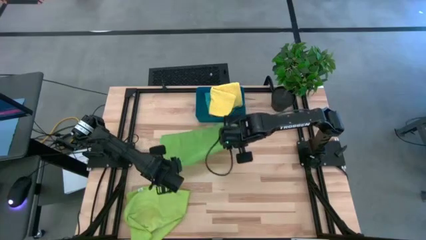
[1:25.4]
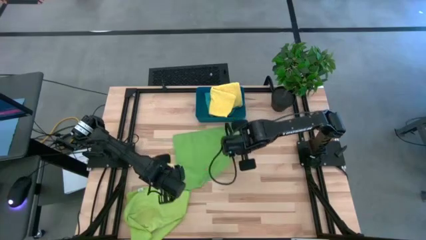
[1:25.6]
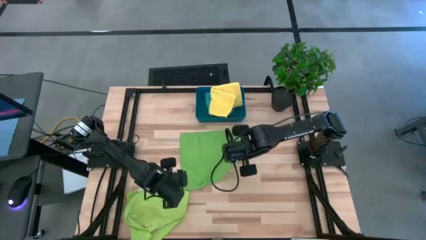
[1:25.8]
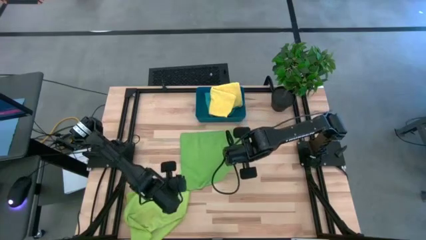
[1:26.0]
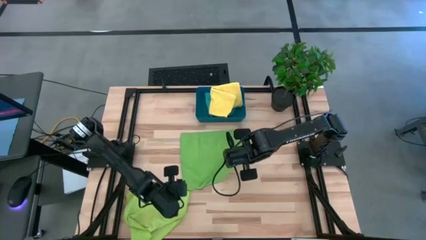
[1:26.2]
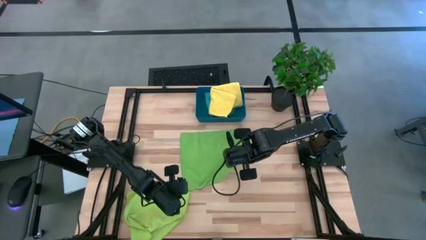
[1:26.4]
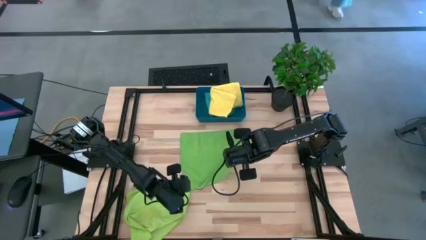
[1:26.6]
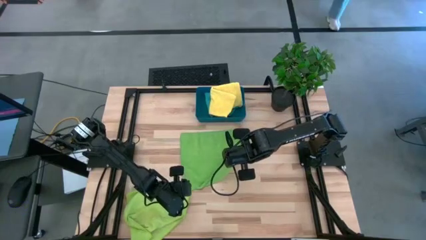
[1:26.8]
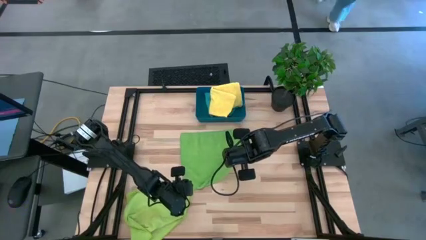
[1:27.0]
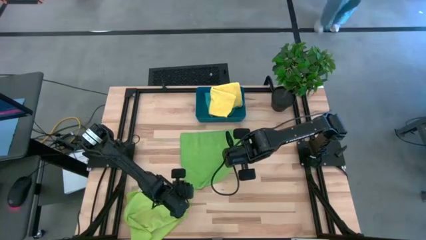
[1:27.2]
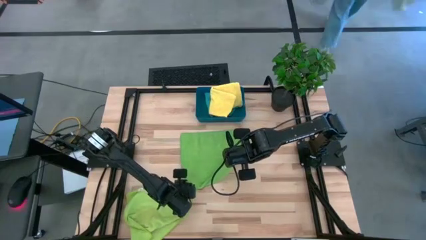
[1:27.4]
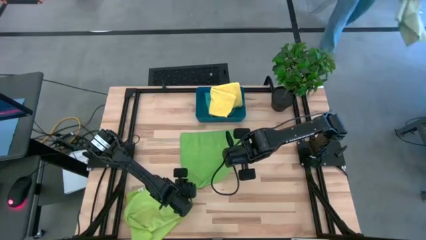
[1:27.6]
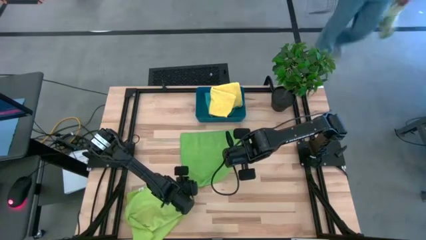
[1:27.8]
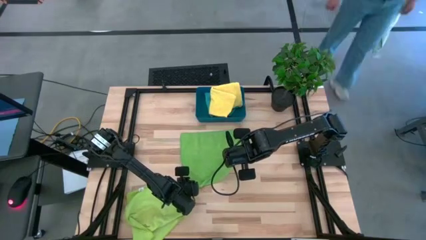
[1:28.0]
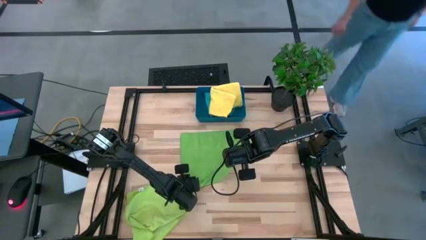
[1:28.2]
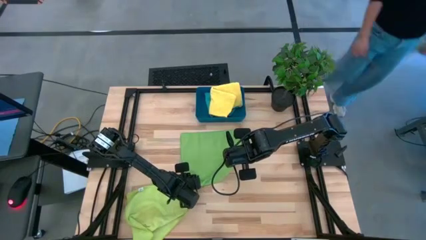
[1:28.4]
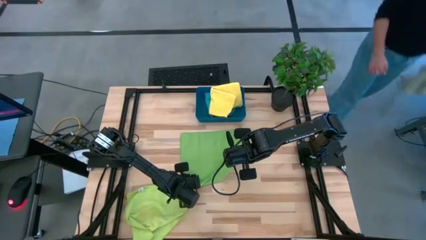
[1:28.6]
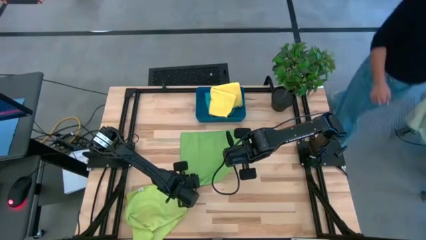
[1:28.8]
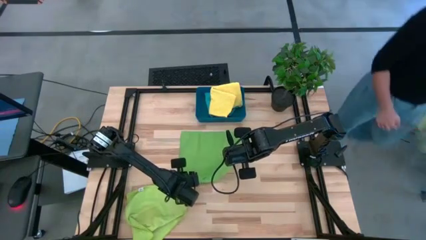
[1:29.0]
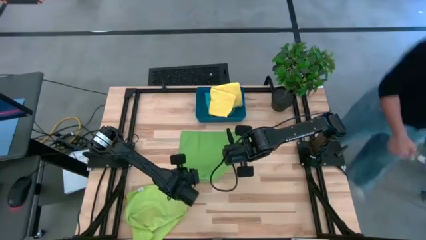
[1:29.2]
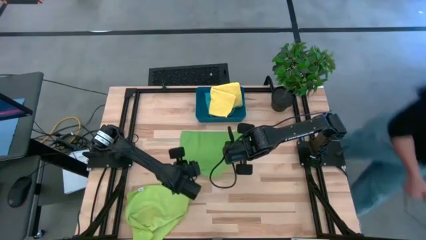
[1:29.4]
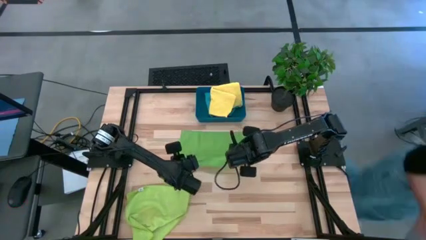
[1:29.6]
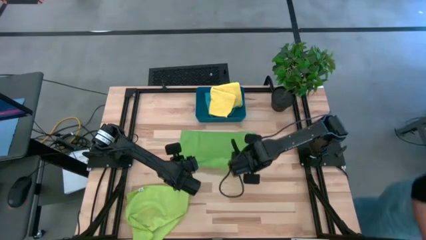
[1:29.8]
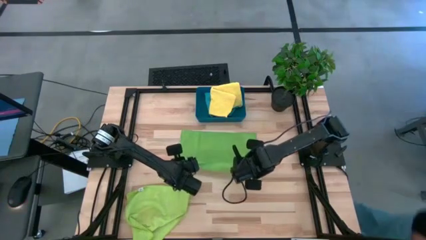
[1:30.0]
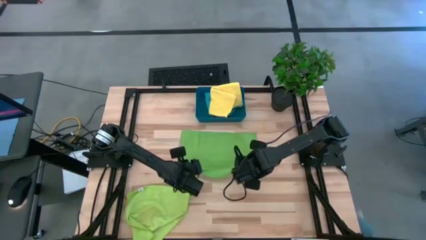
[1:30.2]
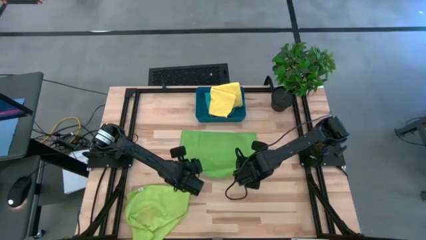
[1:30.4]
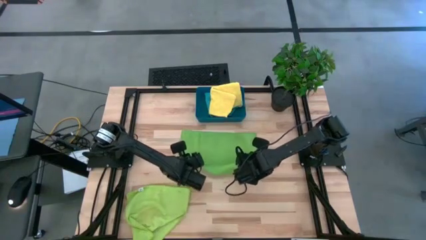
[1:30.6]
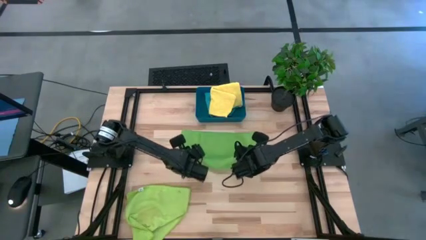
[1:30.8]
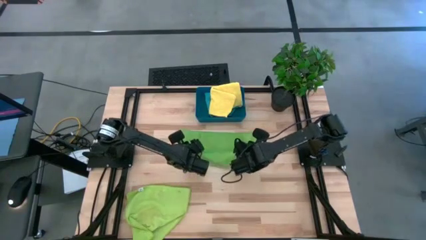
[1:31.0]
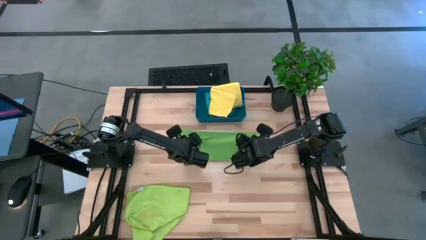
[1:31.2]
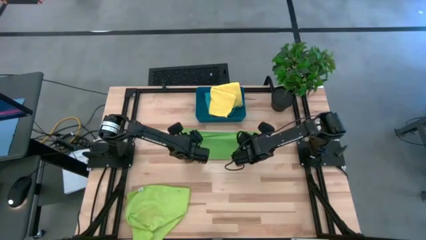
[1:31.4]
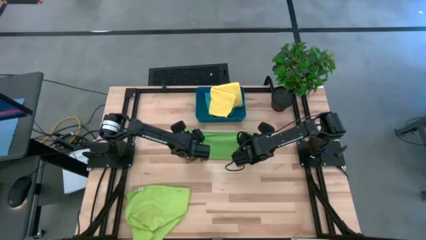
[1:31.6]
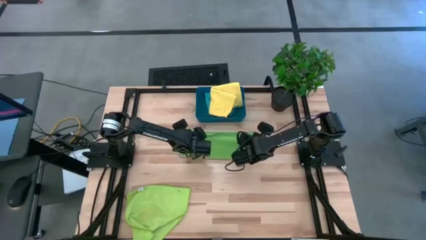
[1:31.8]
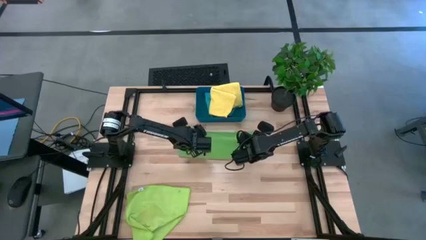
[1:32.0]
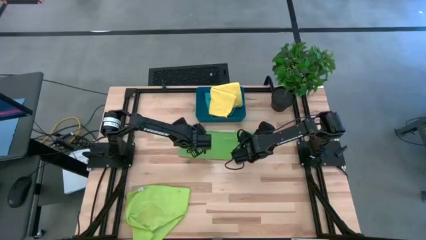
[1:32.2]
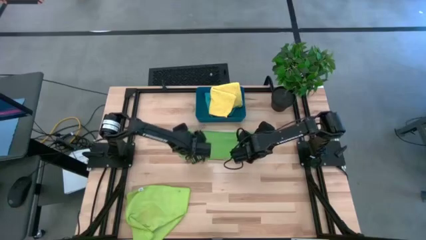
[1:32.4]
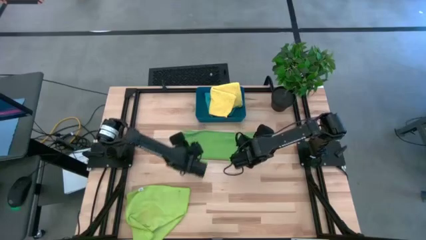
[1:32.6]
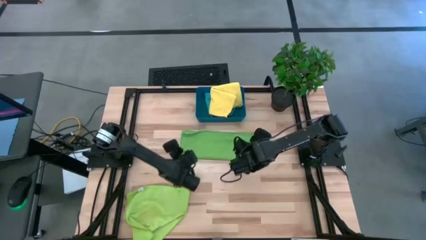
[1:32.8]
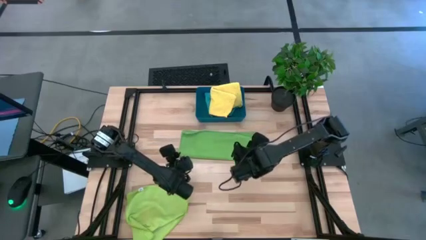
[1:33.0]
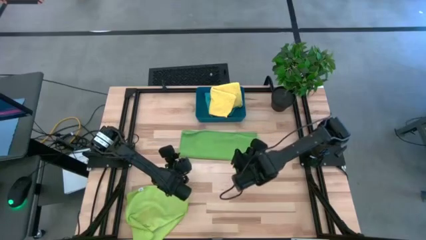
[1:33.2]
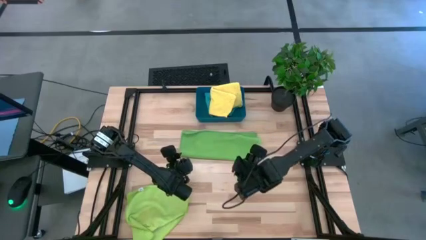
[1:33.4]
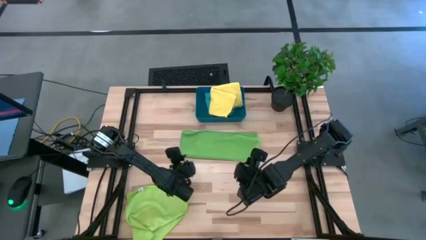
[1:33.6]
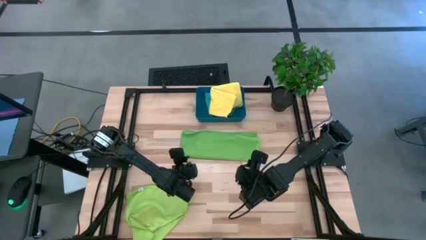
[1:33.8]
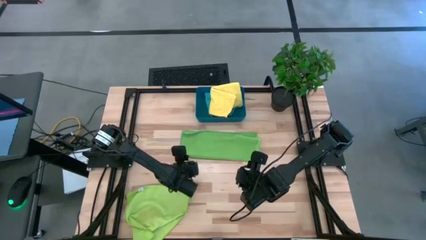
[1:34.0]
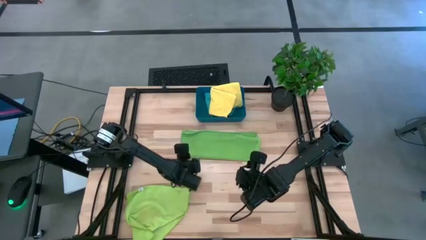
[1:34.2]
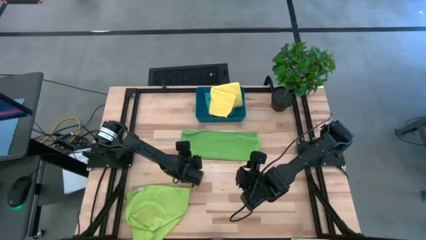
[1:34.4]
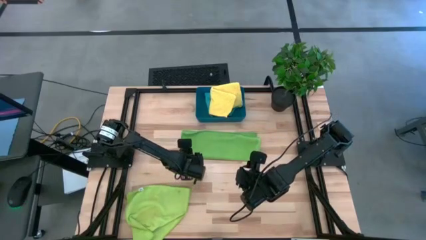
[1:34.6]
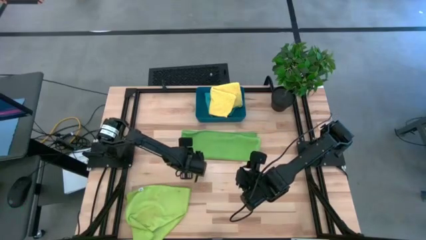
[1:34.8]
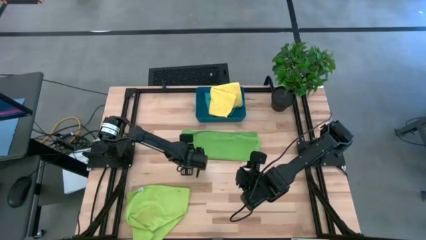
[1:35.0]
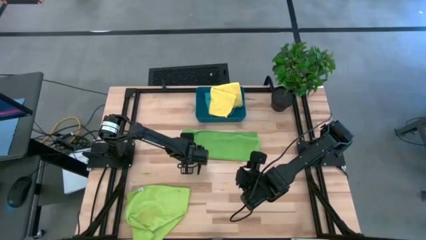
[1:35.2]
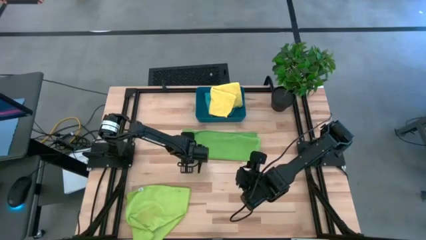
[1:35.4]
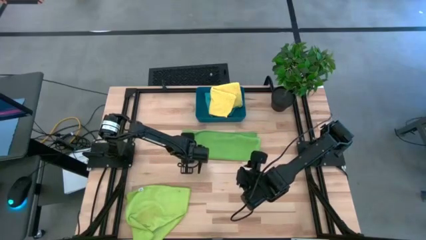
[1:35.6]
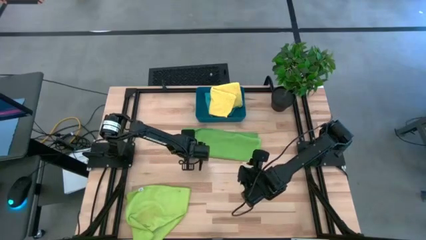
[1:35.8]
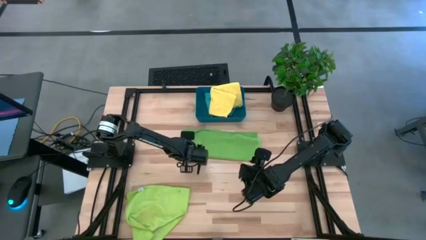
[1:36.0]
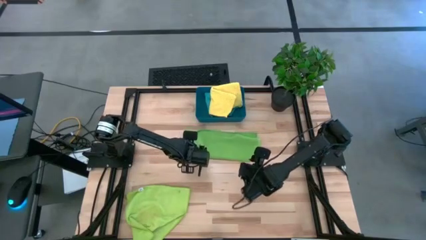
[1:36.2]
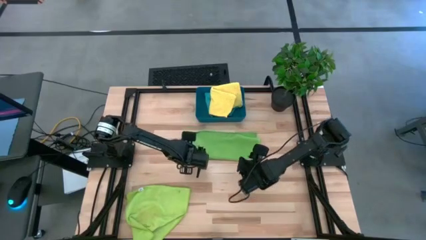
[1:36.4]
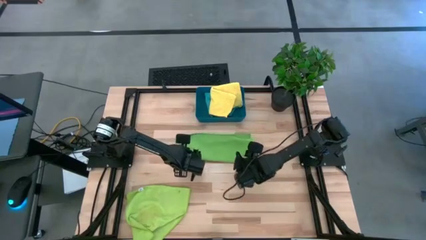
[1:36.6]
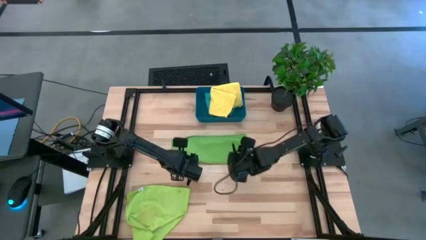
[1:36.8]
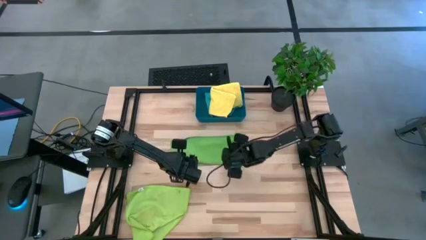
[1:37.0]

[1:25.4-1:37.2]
Task: Fold microfiber towels
Fold the green microfiber cloth

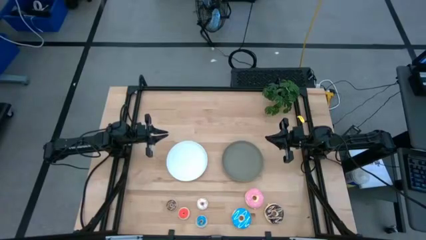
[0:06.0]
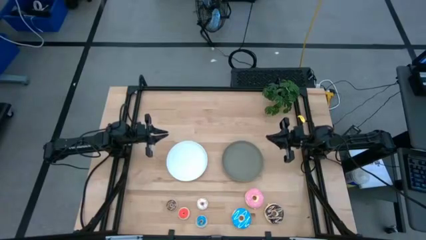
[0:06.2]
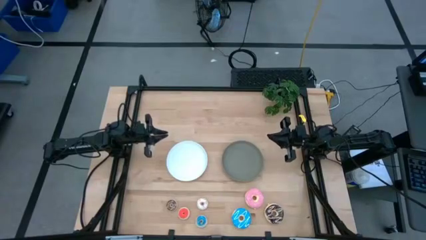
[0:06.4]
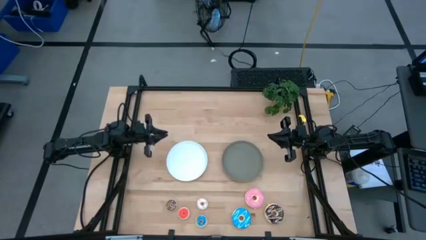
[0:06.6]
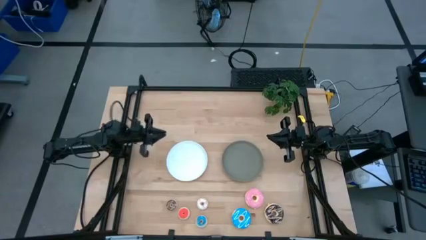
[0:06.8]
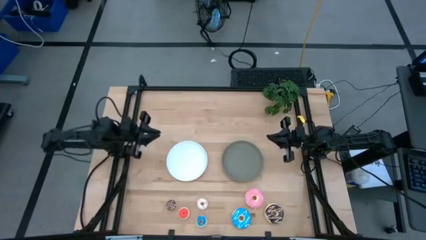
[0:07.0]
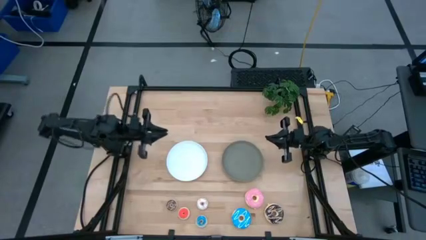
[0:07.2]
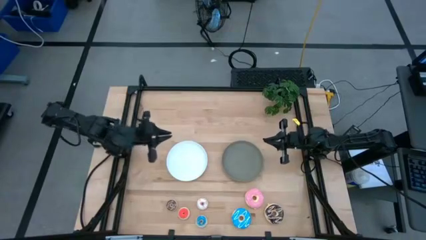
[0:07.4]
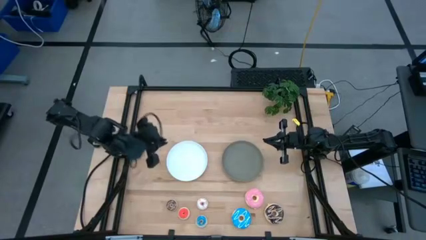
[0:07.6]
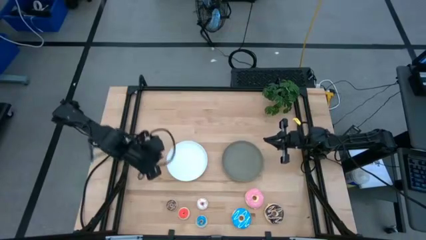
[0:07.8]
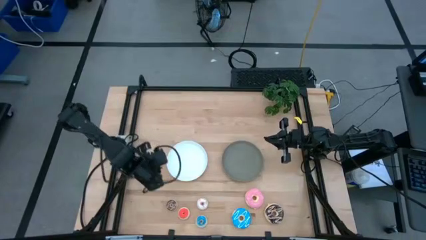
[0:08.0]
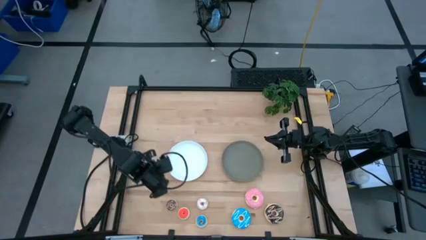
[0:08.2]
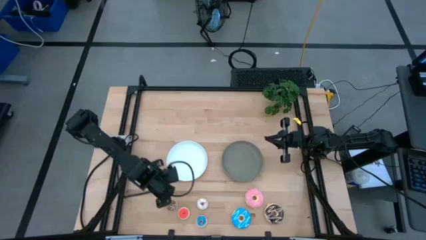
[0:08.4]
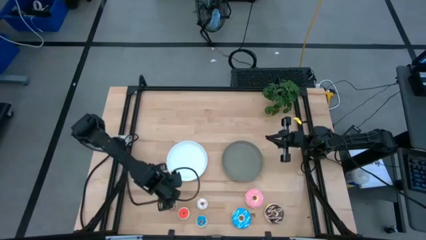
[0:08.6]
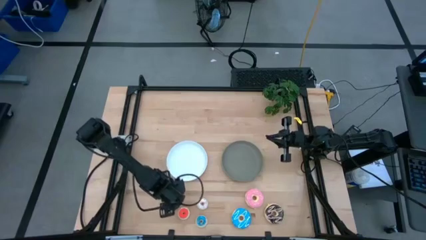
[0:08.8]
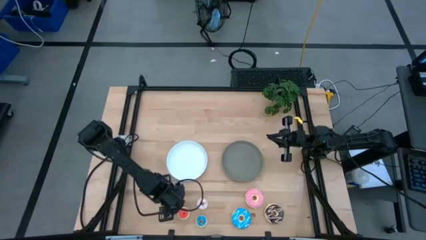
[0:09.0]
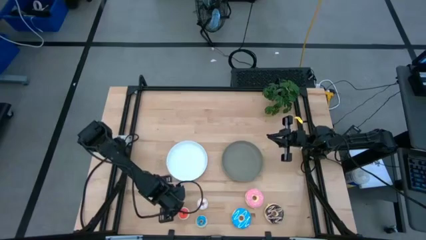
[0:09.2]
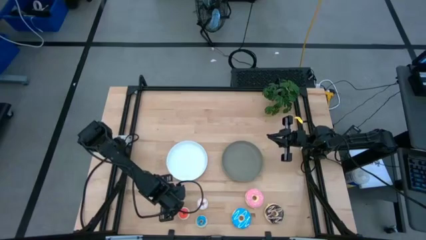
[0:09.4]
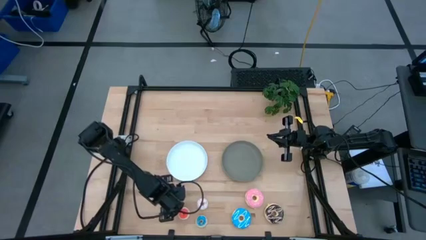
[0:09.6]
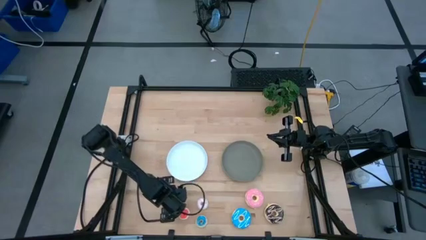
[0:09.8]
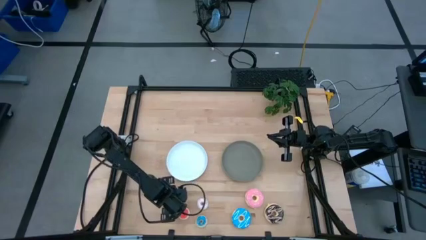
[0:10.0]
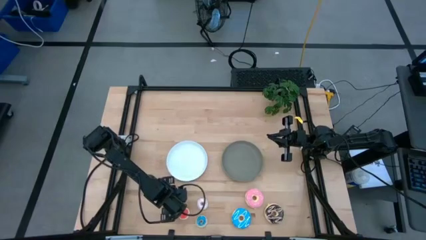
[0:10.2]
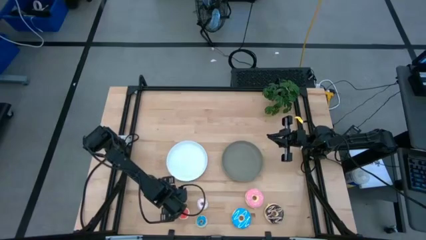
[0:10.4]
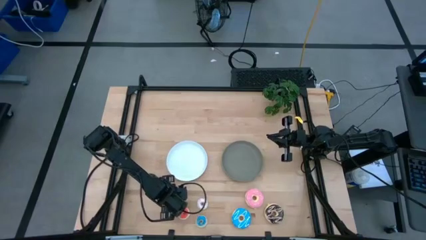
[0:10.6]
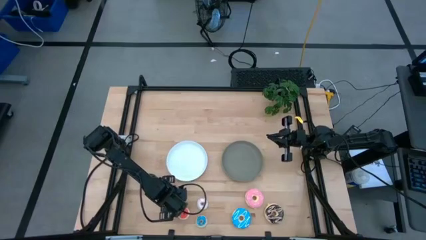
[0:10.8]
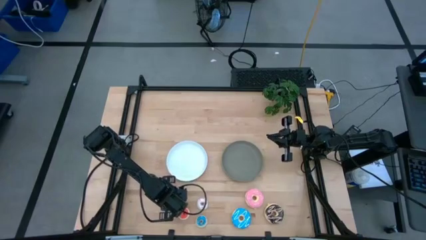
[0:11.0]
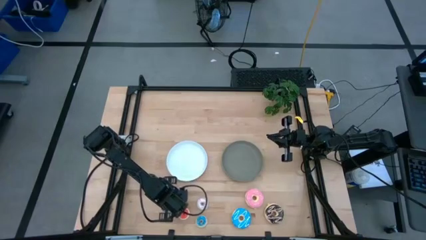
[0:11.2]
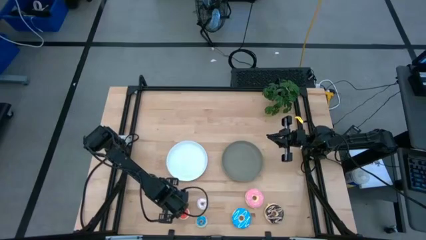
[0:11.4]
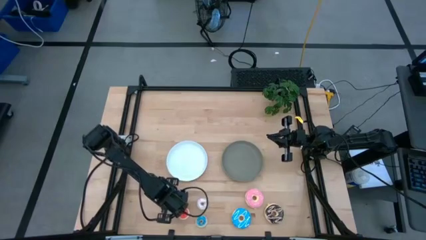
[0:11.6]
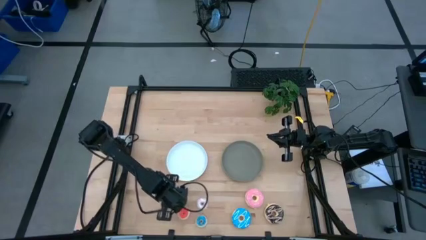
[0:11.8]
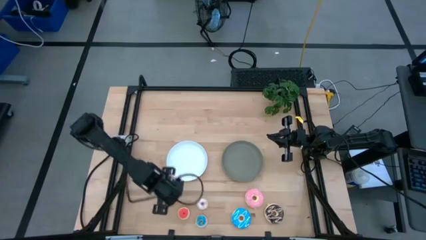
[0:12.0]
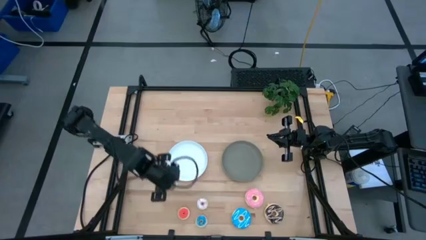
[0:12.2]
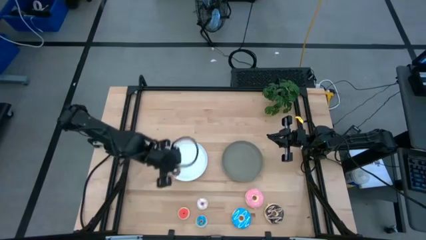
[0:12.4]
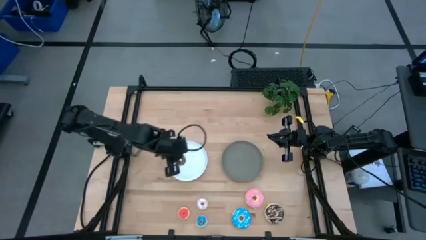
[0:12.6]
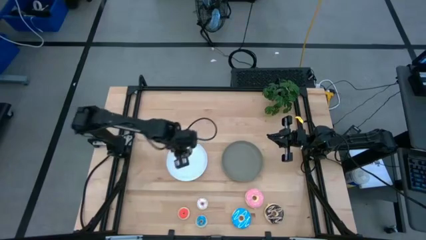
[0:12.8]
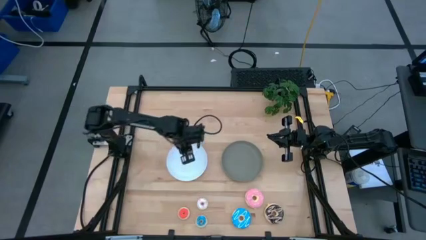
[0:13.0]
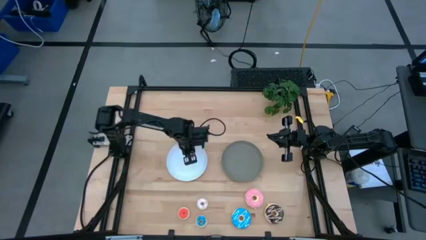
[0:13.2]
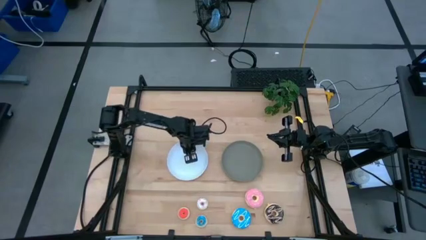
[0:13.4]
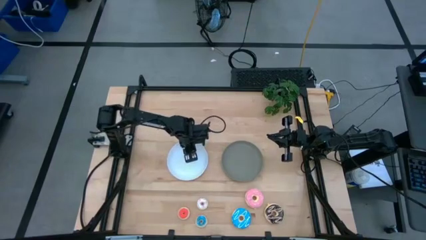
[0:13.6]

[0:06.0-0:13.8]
Task: Pick & Place donuts
Put the small brown doughnut on the white plate
